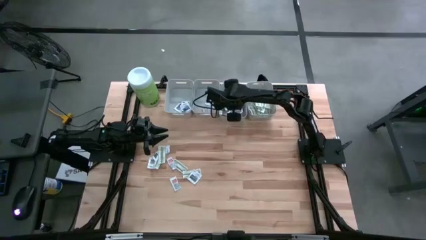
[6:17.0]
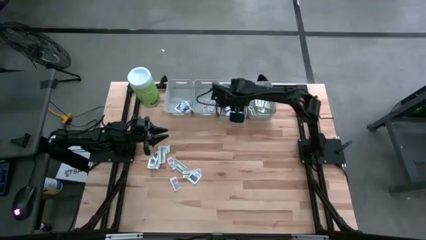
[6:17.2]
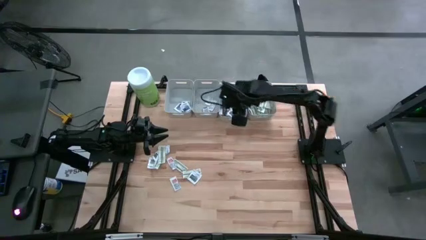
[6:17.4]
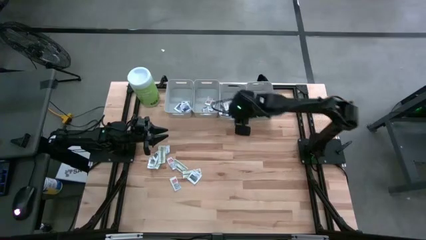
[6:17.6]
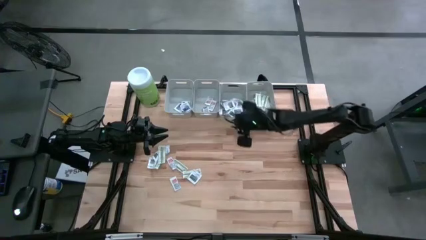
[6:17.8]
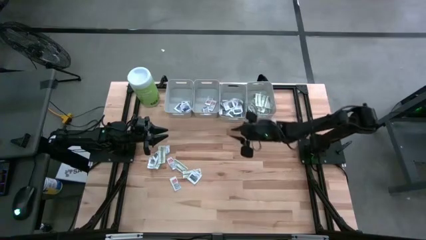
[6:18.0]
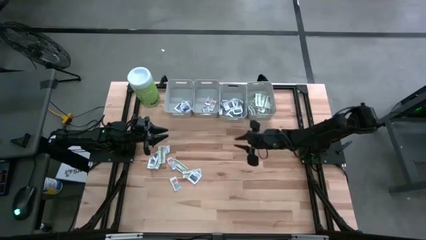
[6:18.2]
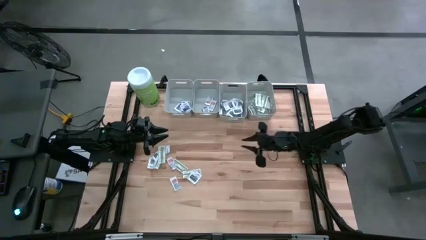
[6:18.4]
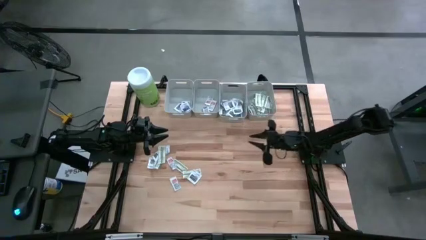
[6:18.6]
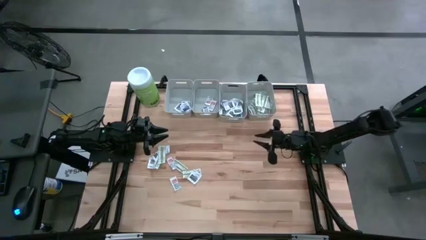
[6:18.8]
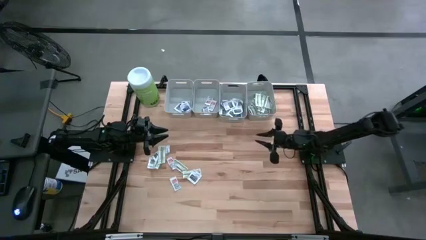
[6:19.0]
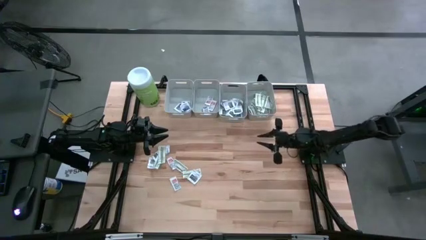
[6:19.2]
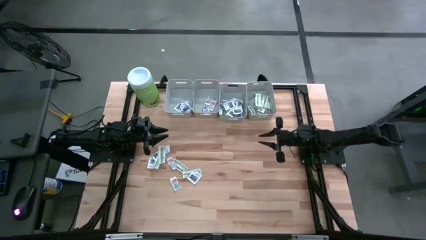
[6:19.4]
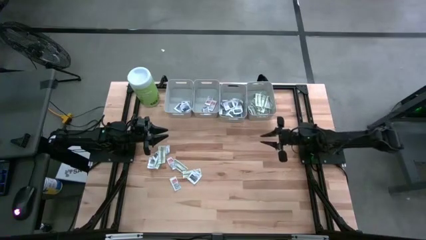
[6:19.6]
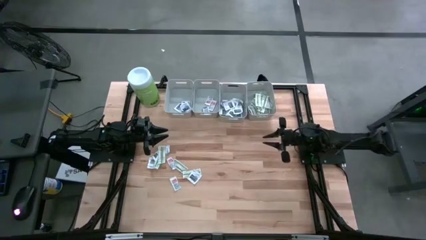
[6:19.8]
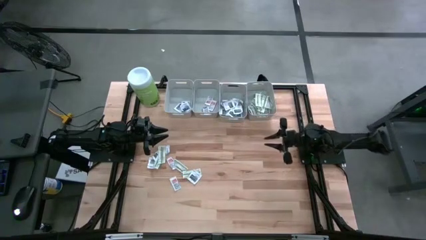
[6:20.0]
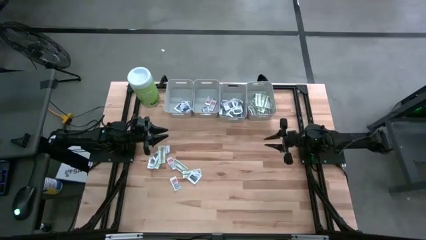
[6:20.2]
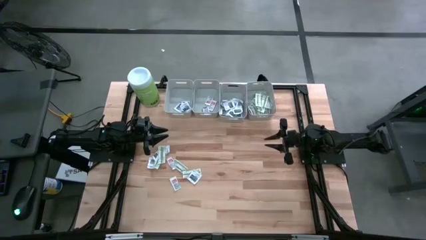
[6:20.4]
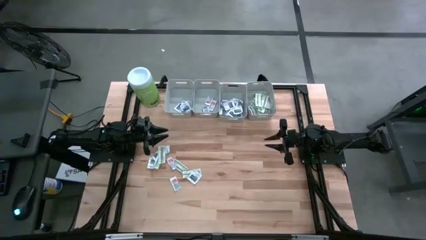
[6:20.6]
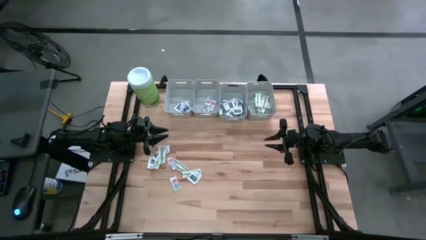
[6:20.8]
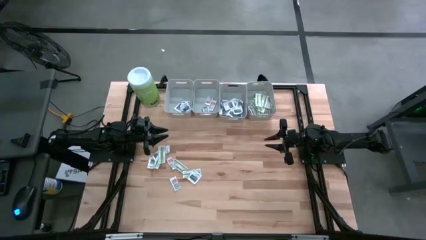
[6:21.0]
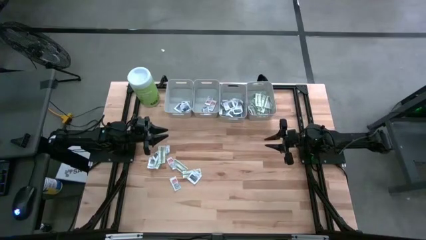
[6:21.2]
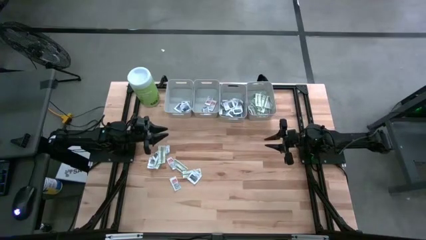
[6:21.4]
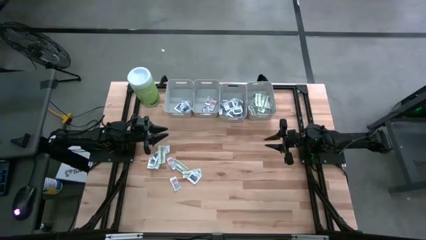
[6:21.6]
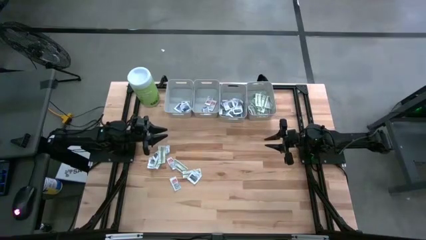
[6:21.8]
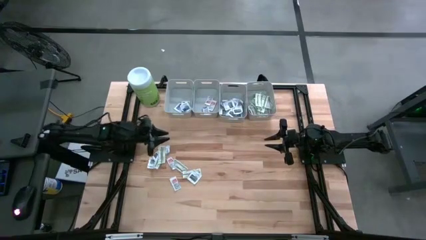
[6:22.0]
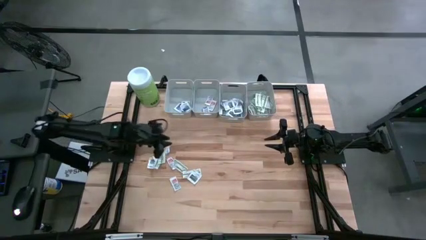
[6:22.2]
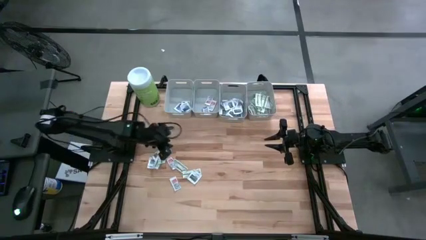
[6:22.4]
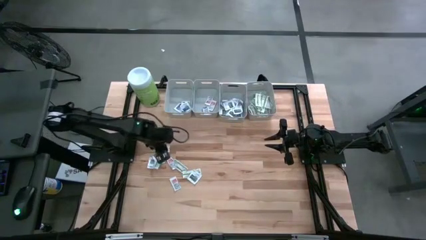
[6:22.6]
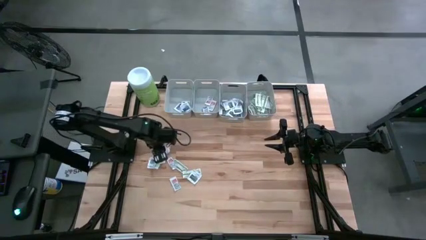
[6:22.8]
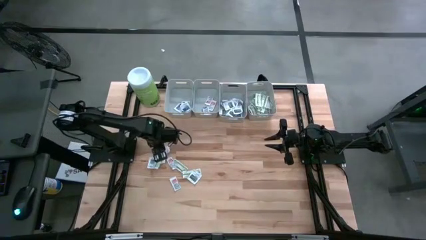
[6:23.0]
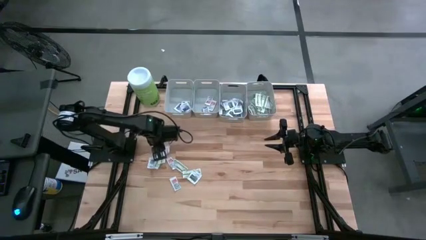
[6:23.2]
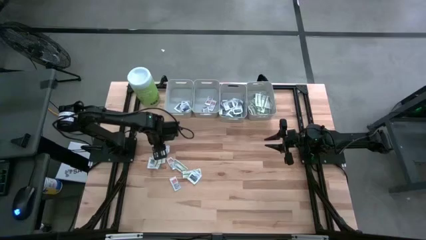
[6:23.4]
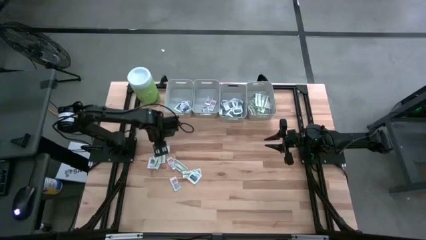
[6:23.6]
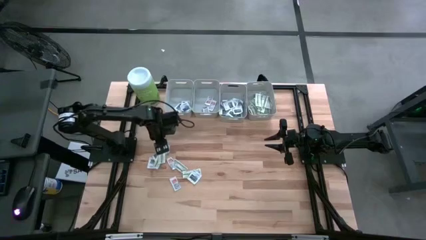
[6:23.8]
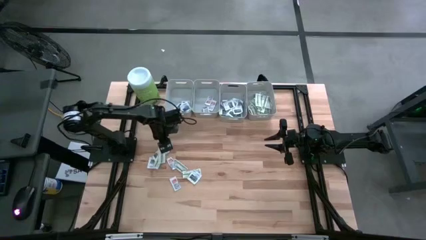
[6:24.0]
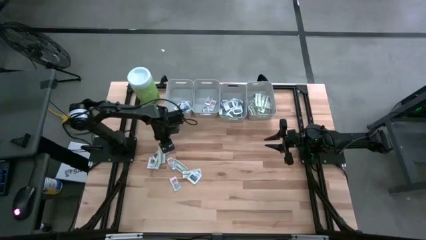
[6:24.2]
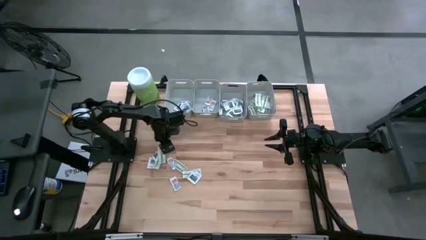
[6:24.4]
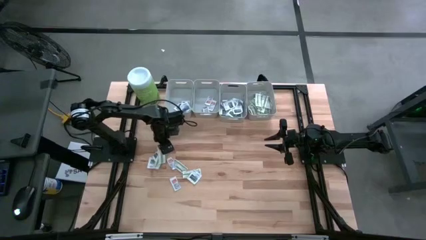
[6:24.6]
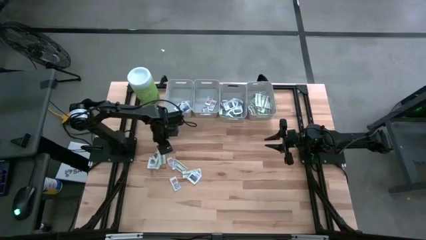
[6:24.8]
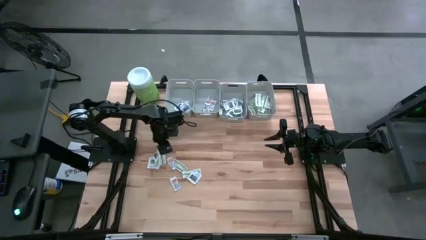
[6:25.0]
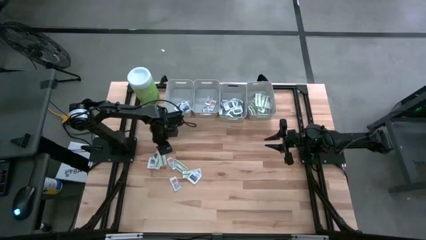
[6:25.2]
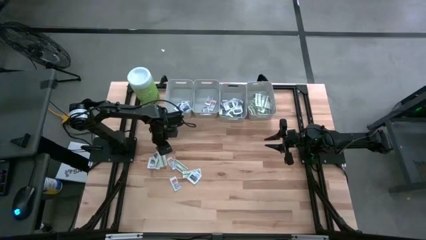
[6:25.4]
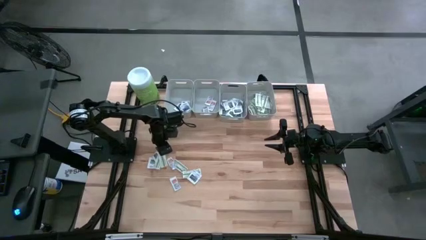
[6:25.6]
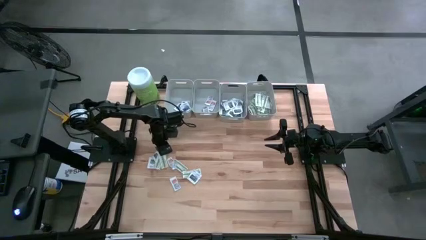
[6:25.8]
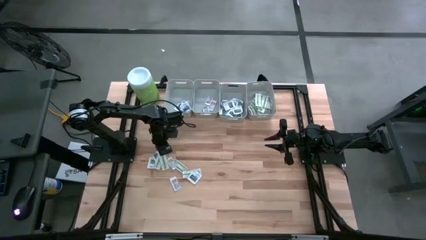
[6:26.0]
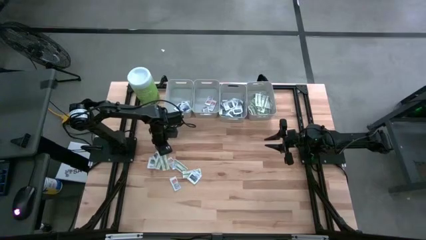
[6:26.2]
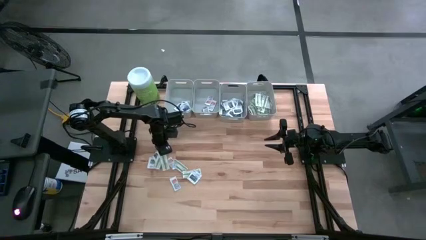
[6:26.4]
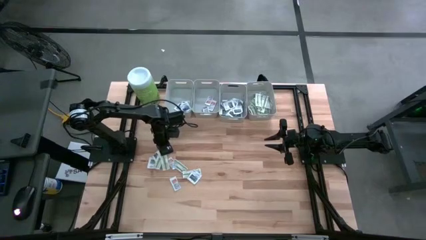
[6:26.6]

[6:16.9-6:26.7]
Task: Pick & Place First Aid Supplies
Put the bandage into the right gray bin

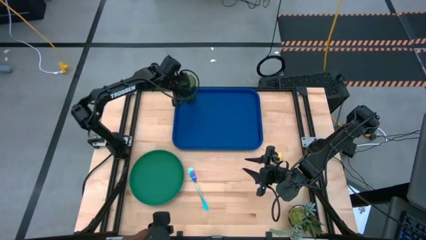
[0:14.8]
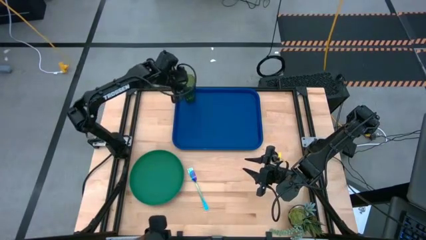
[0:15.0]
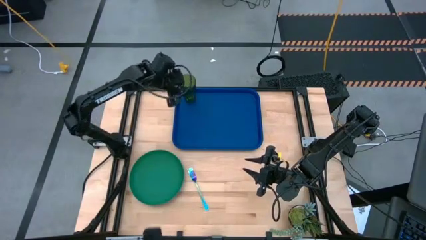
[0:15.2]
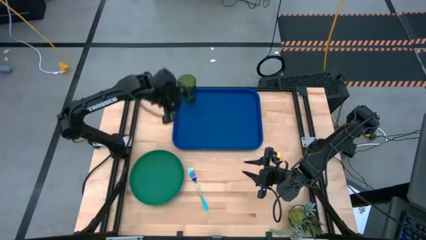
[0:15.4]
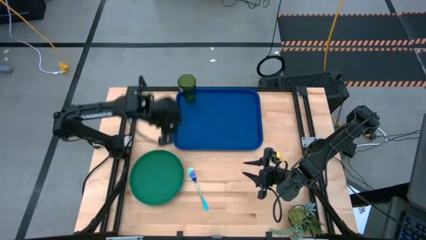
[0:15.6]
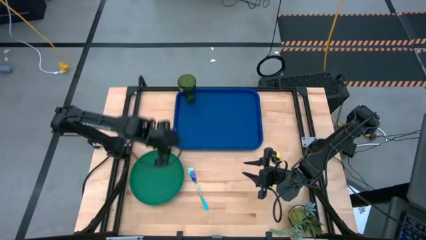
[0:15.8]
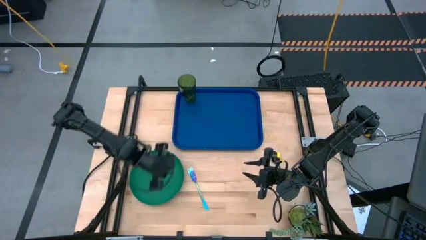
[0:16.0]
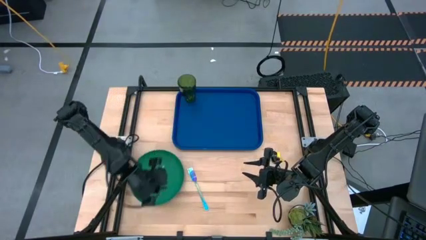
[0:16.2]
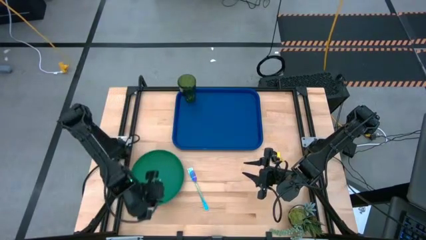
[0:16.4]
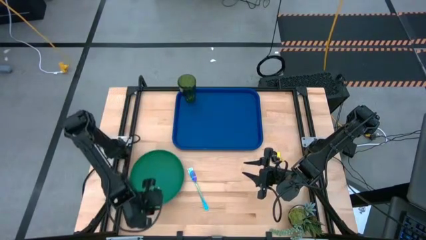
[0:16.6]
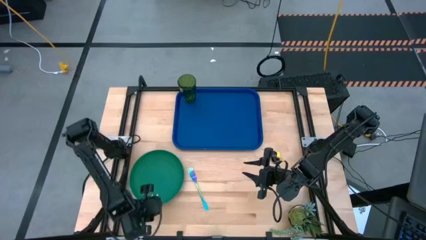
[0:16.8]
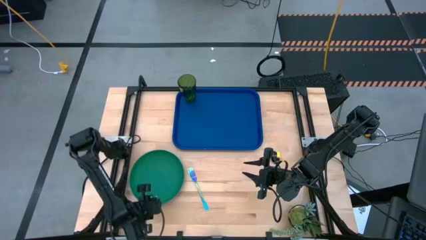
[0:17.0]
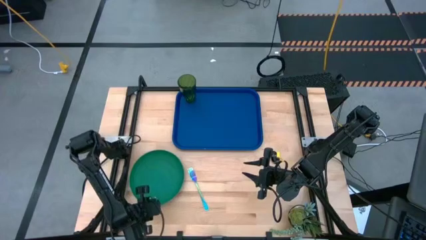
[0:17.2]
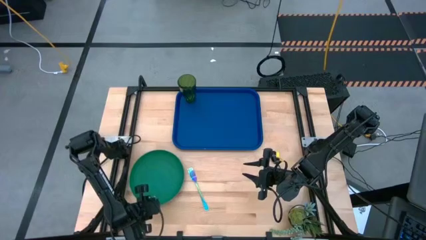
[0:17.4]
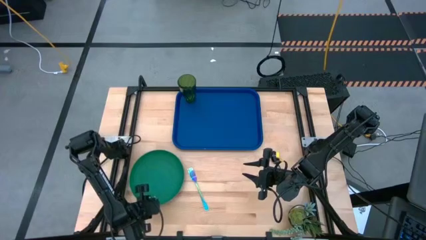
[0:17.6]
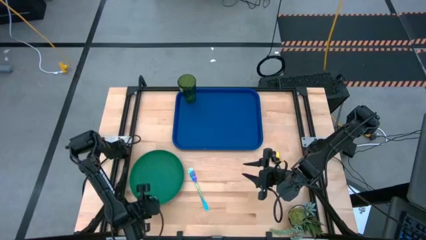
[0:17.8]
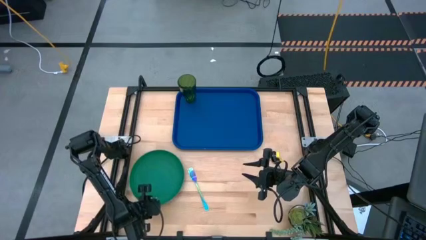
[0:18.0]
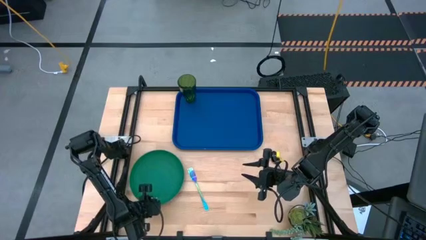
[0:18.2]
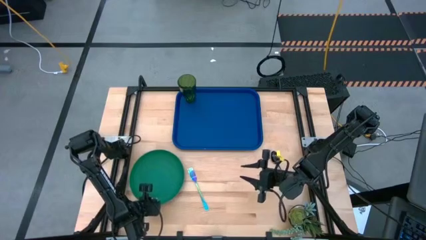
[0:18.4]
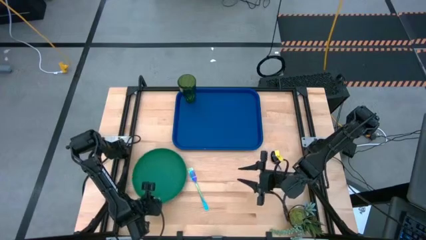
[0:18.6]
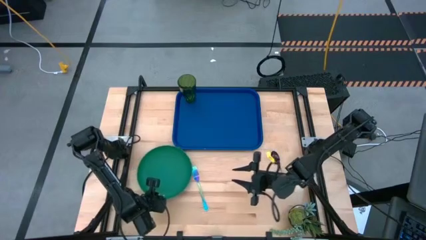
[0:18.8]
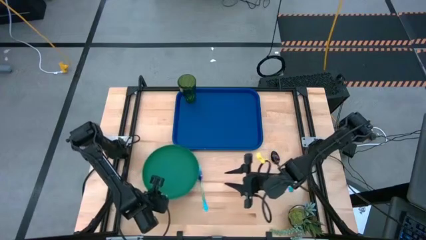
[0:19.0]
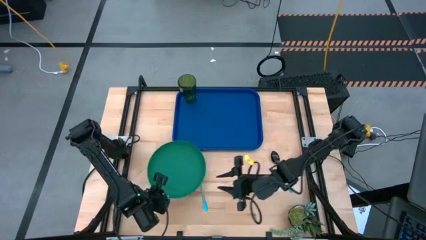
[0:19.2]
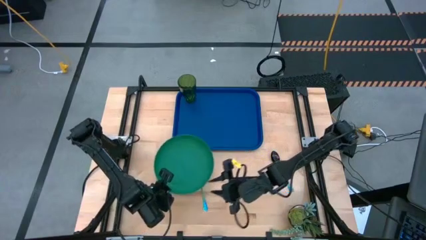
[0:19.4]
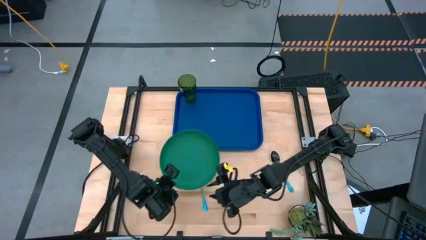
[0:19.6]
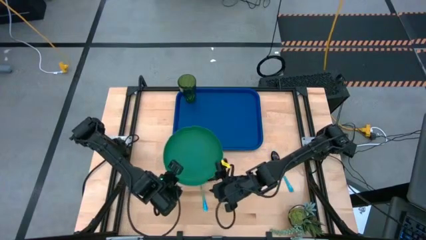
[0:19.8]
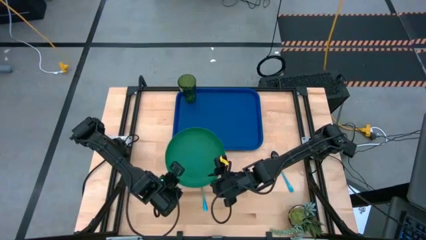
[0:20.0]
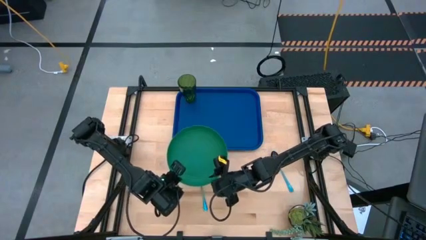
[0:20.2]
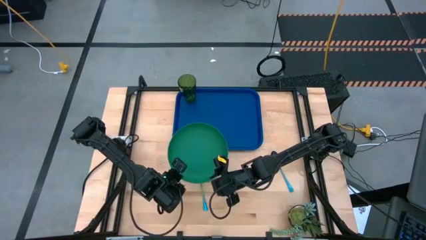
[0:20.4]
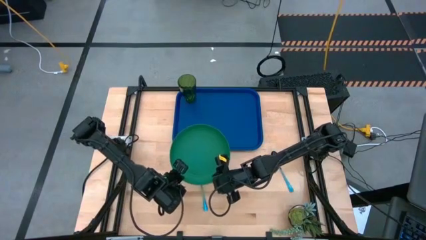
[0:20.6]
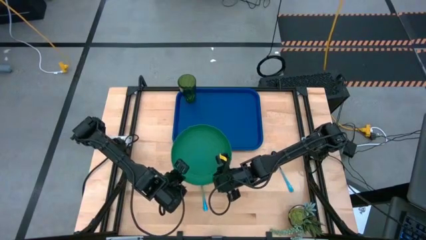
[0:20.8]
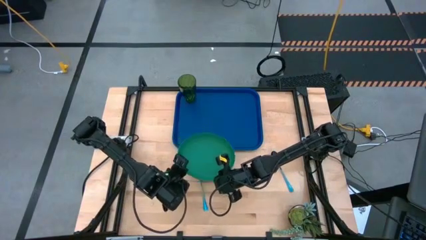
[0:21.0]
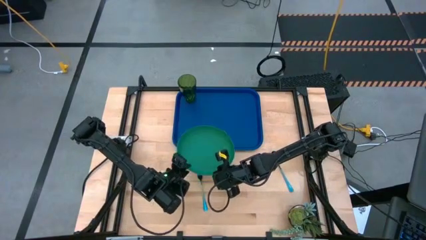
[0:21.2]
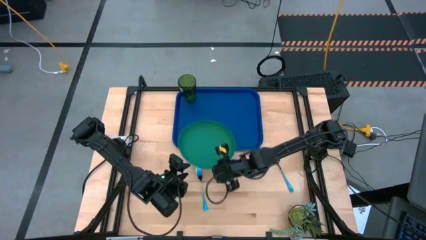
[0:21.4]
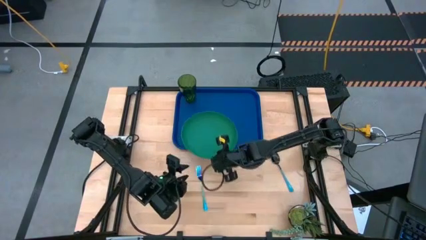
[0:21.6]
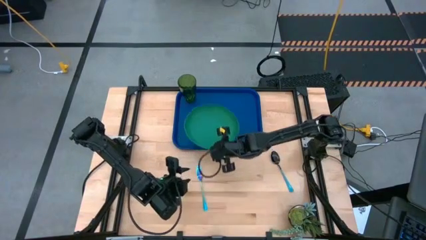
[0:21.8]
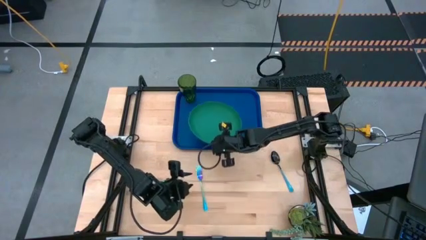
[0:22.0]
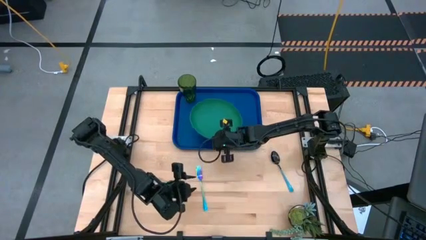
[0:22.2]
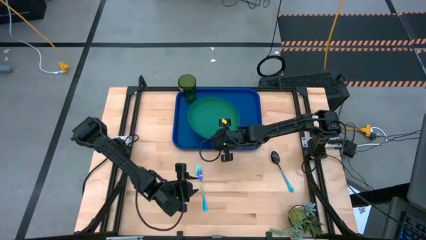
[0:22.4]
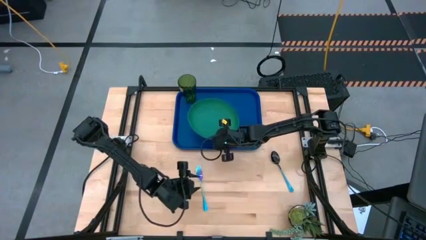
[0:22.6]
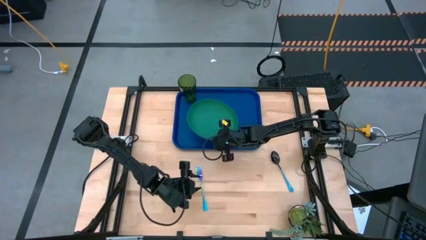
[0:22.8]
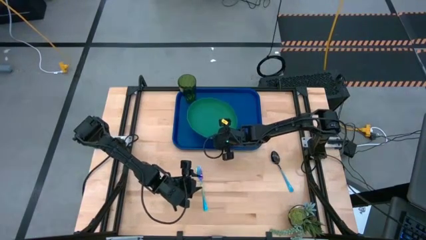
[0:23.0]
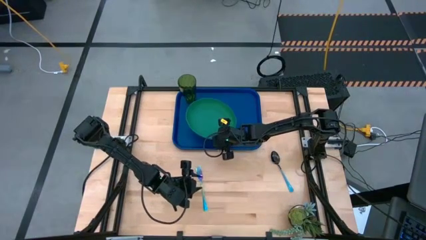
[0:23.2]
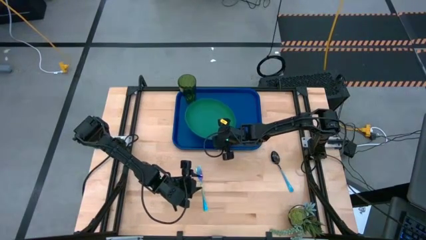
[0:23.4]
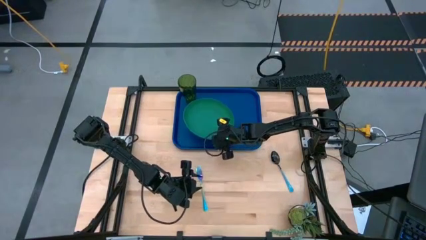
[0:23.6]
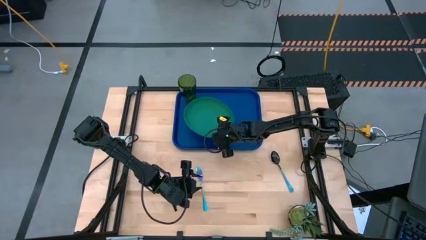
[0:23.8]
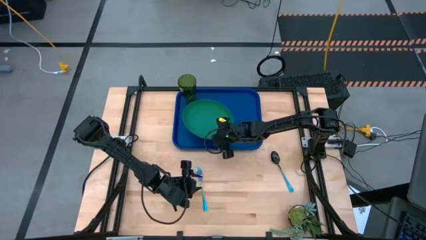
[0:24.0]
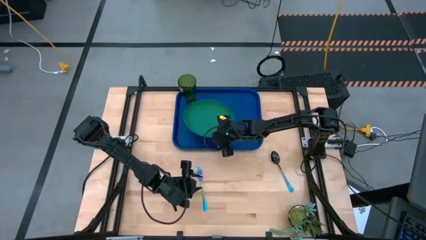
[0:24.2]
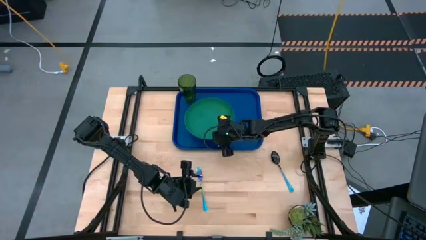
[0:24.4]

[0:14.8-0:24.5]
Task: Pick and place plate/cup/fork/spoon on tray
Put the green plate to the bottom right of the green cup on the blue serving tray
